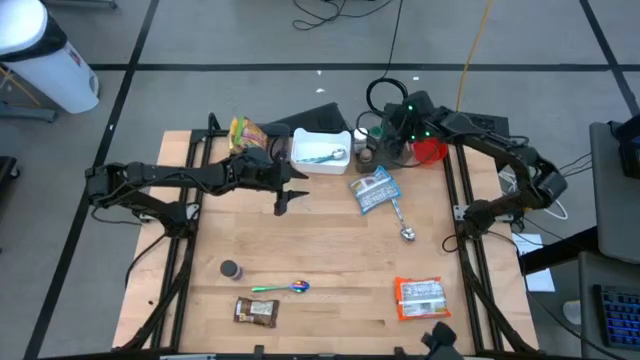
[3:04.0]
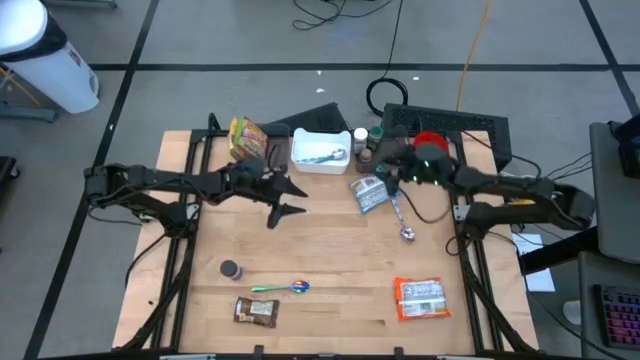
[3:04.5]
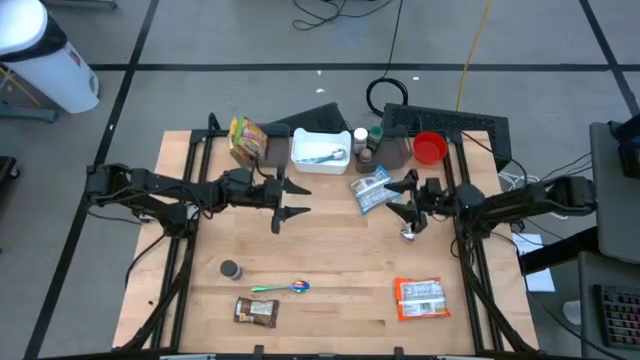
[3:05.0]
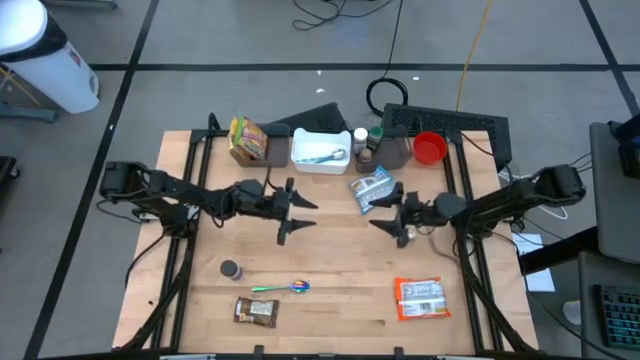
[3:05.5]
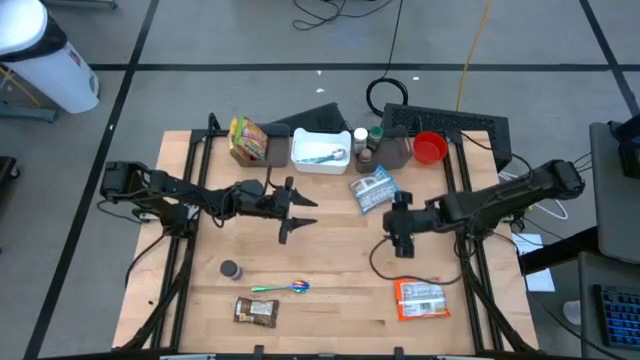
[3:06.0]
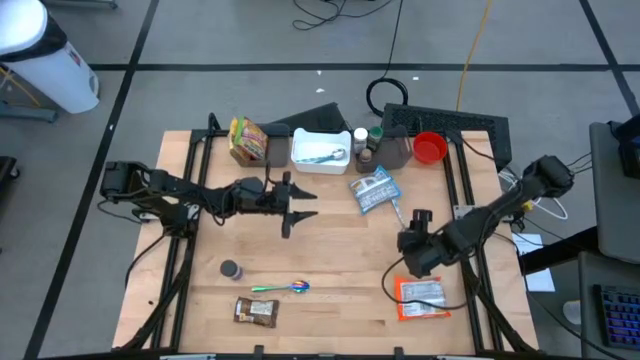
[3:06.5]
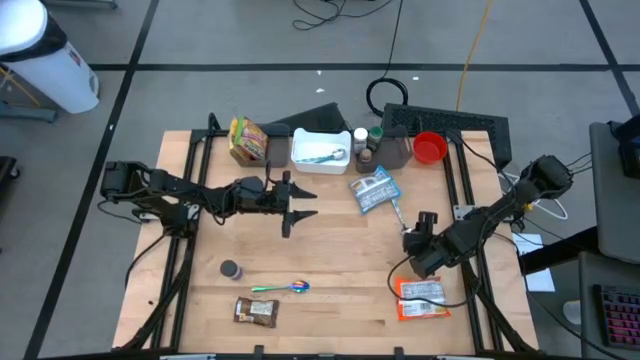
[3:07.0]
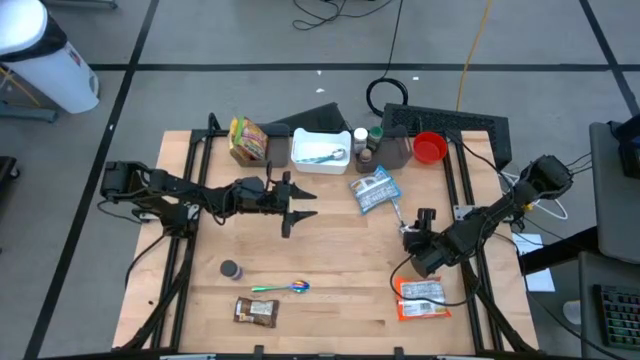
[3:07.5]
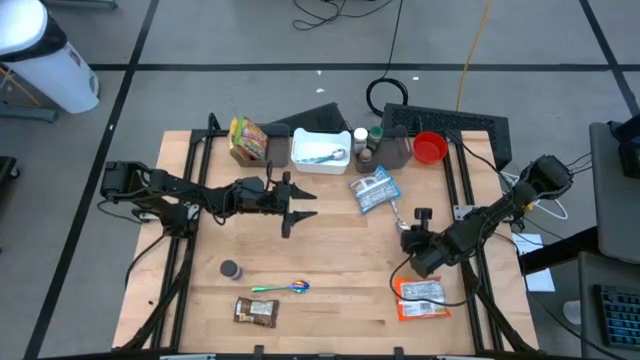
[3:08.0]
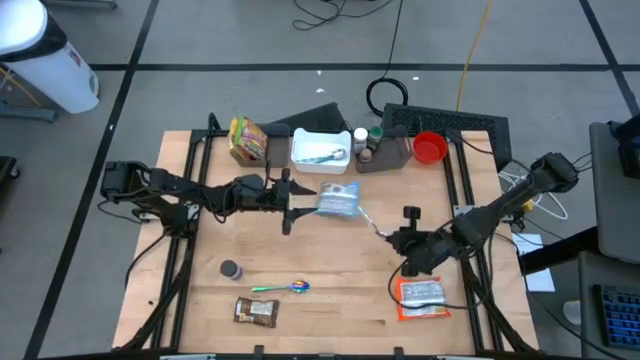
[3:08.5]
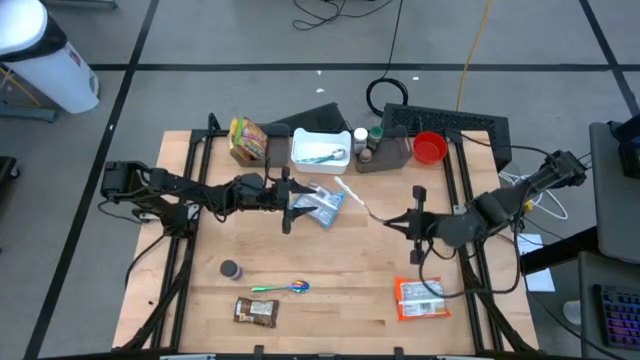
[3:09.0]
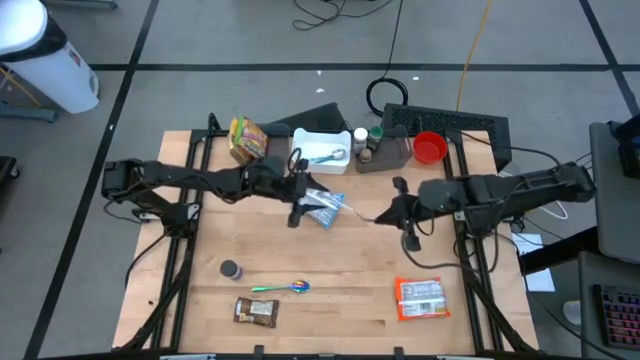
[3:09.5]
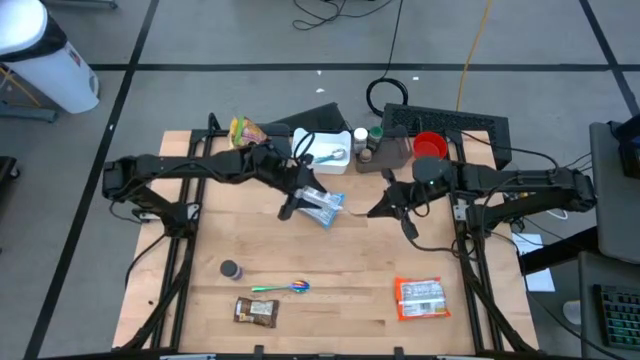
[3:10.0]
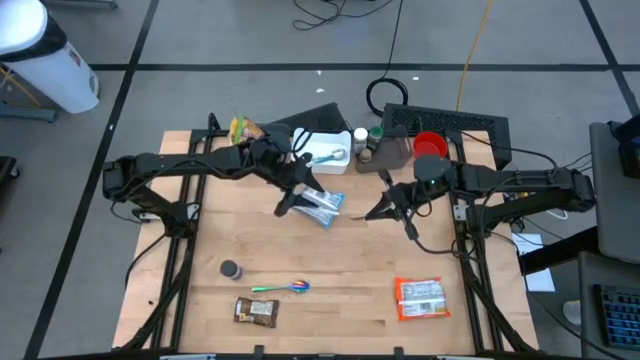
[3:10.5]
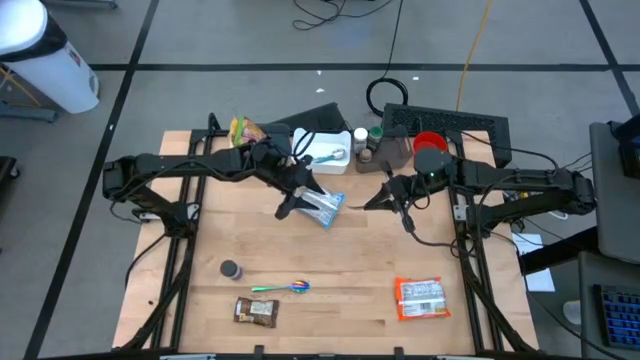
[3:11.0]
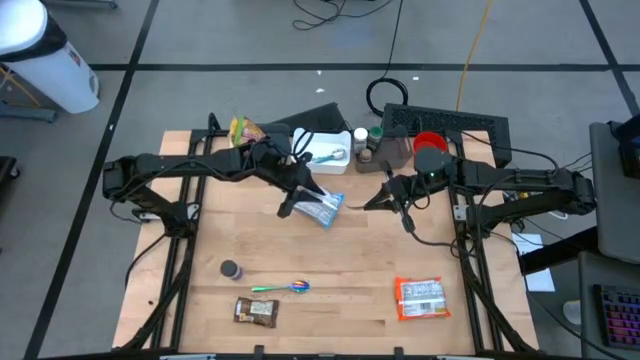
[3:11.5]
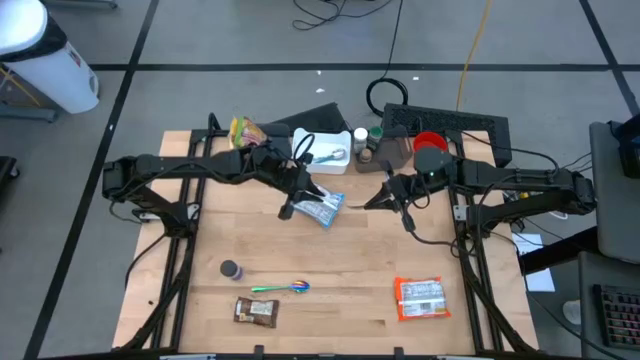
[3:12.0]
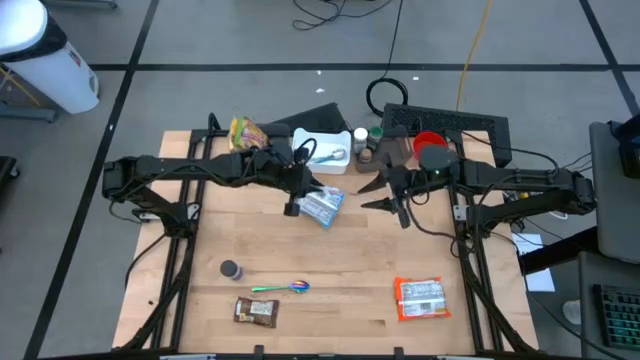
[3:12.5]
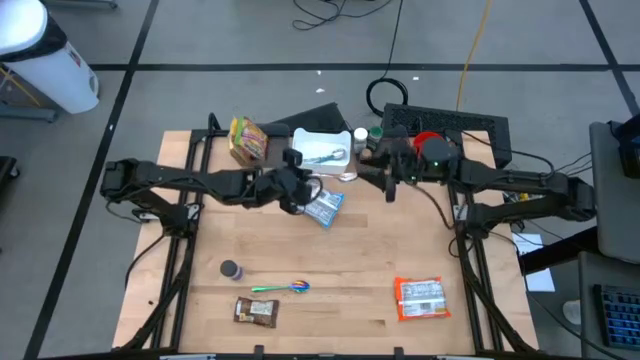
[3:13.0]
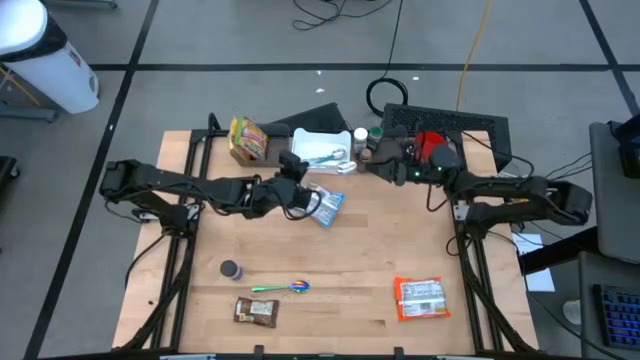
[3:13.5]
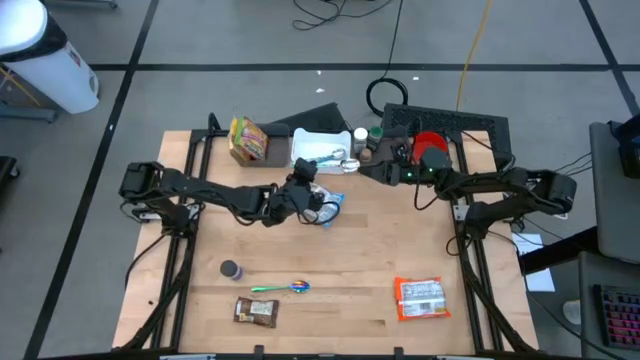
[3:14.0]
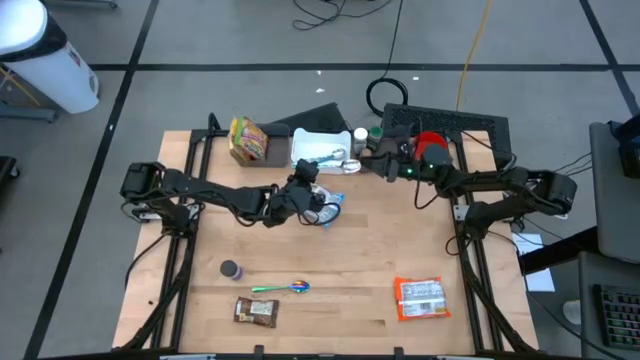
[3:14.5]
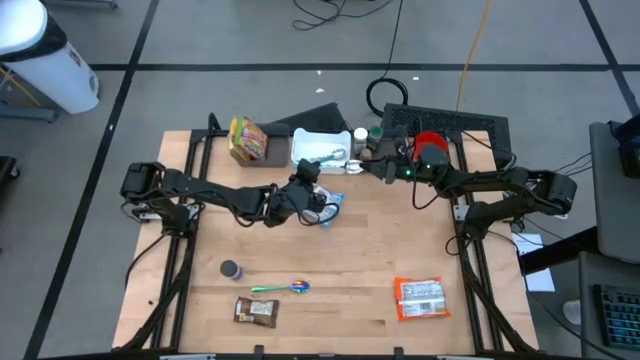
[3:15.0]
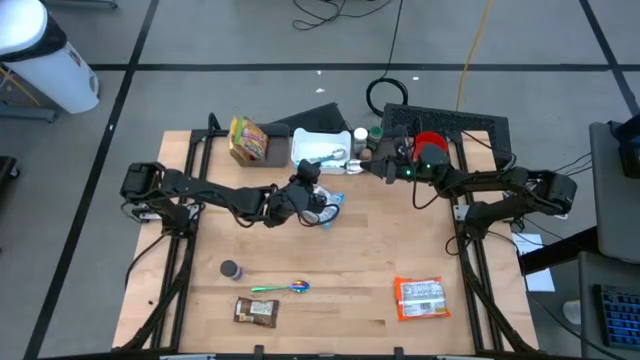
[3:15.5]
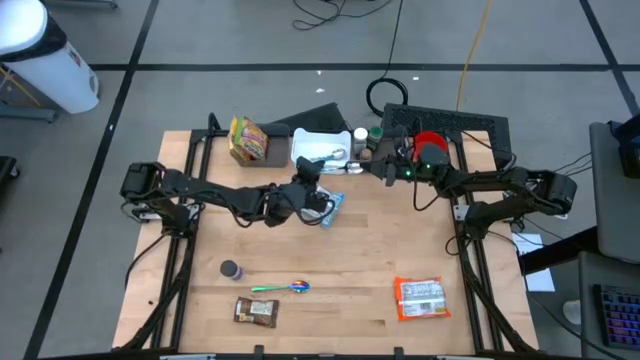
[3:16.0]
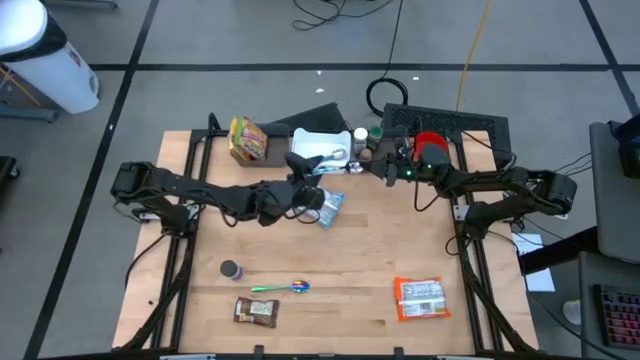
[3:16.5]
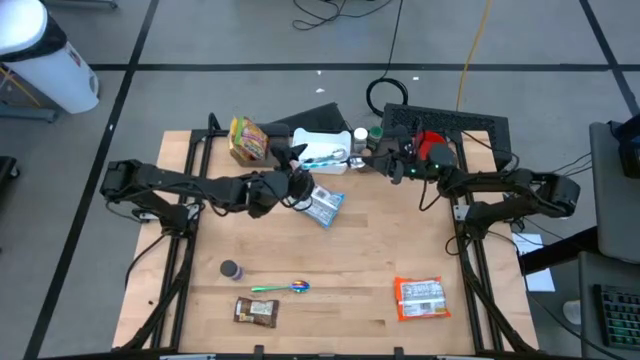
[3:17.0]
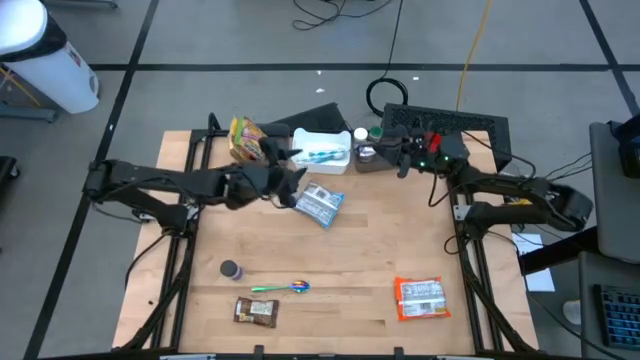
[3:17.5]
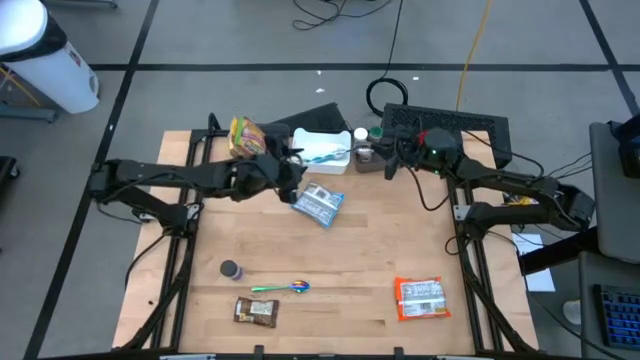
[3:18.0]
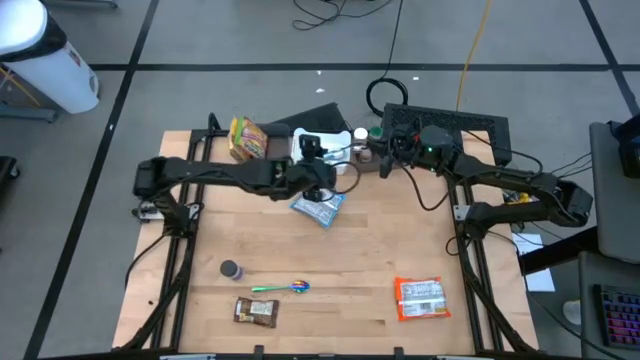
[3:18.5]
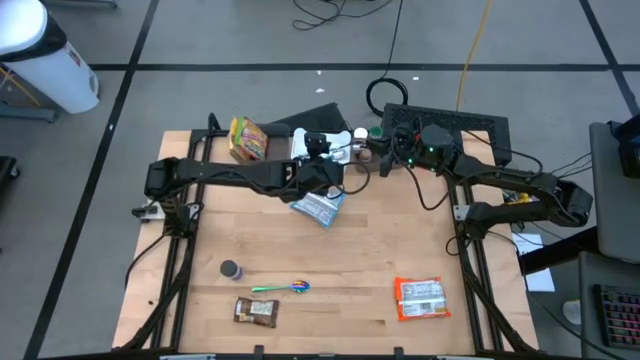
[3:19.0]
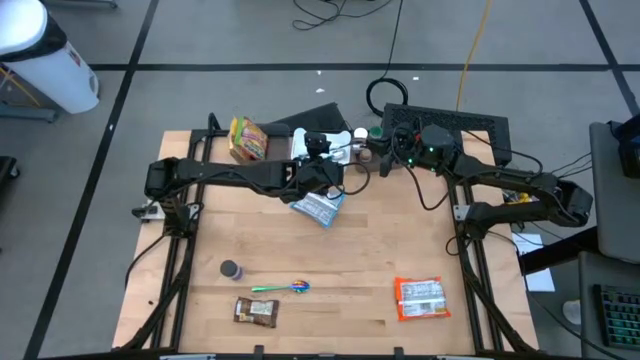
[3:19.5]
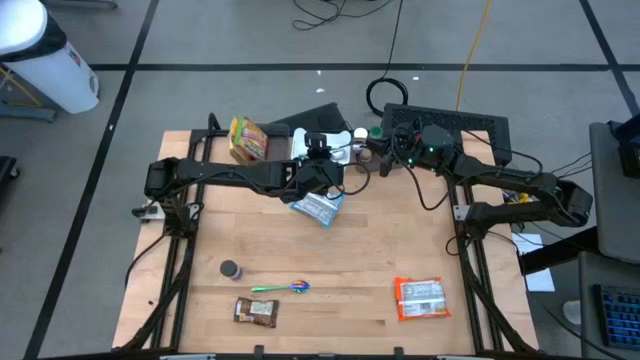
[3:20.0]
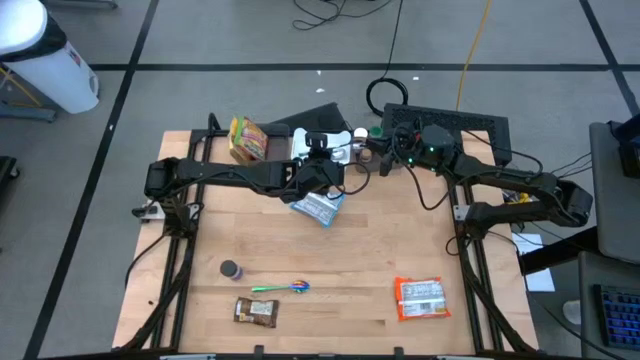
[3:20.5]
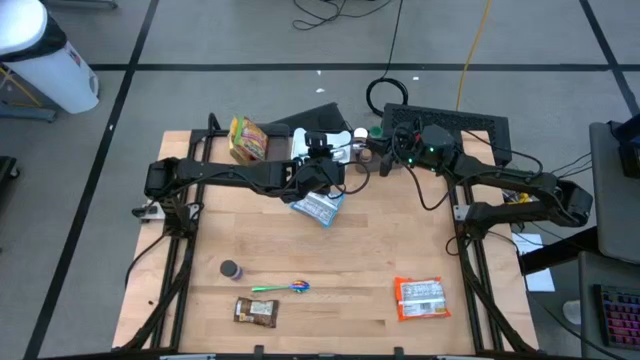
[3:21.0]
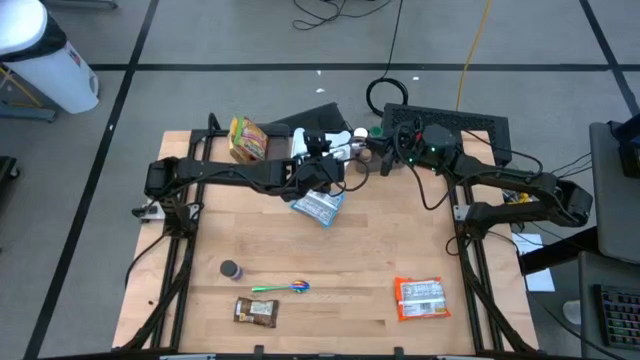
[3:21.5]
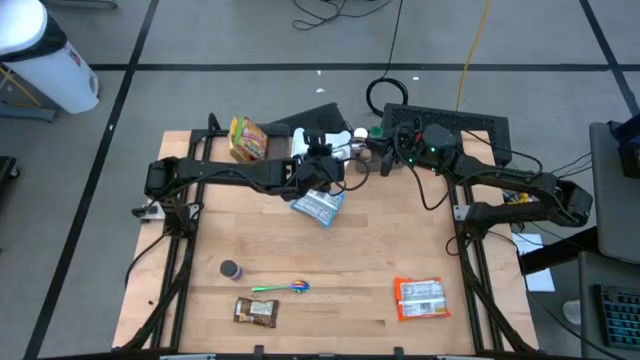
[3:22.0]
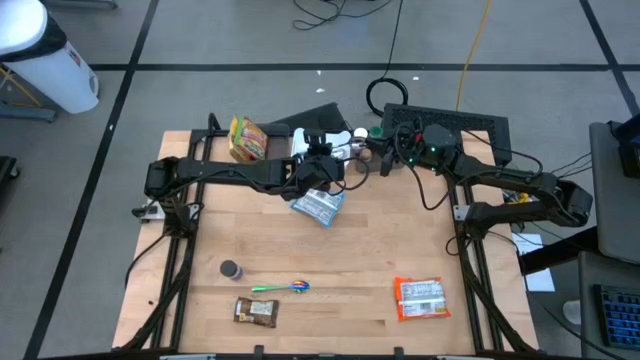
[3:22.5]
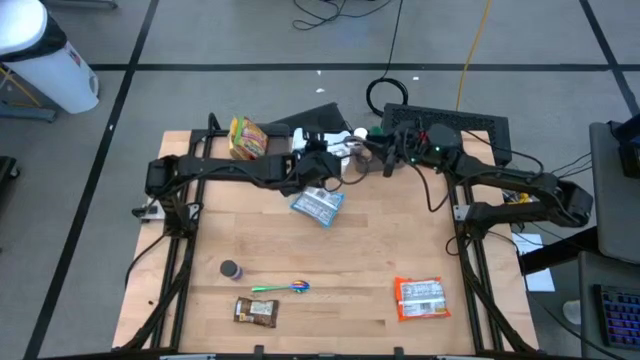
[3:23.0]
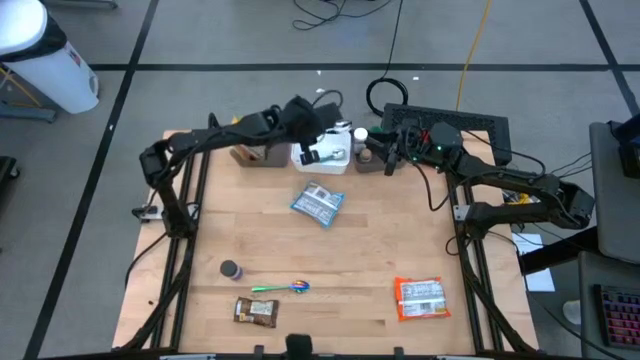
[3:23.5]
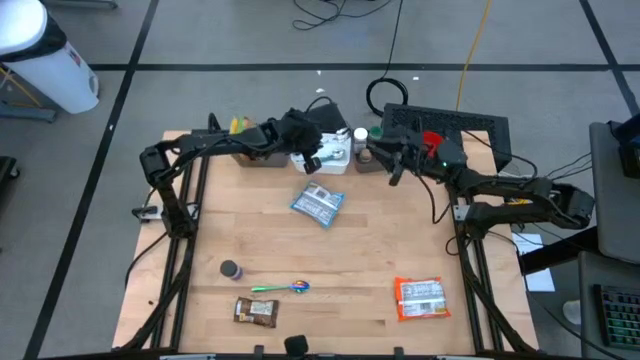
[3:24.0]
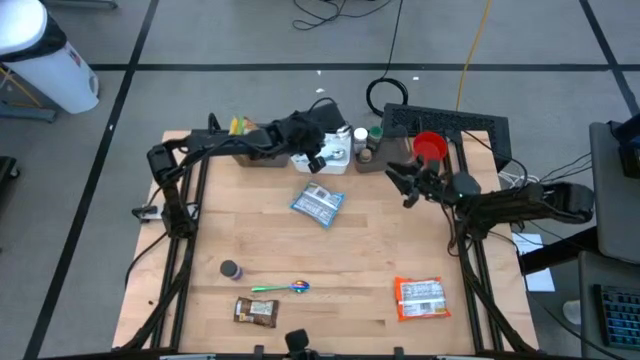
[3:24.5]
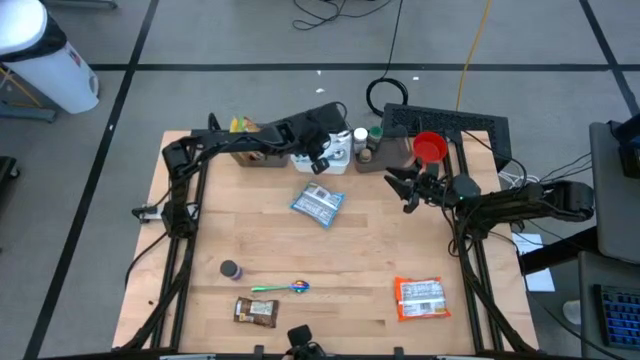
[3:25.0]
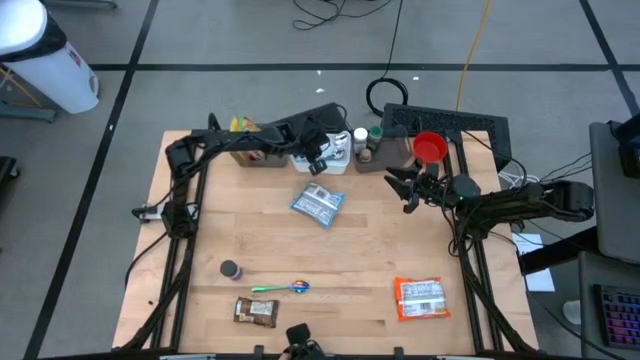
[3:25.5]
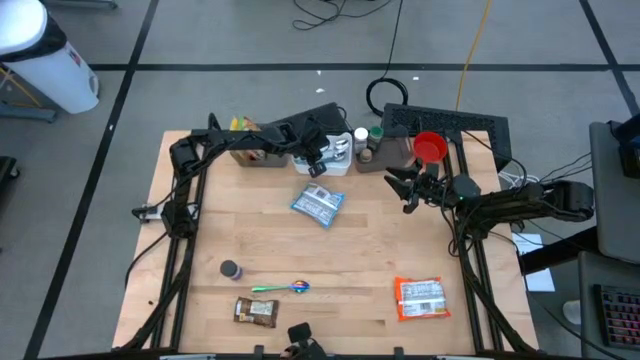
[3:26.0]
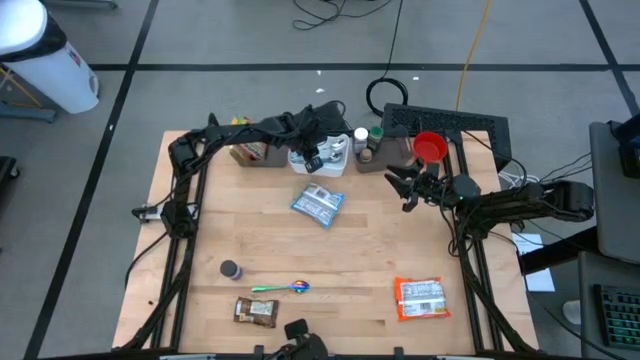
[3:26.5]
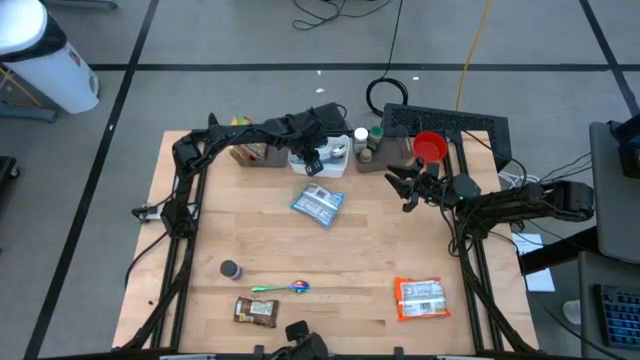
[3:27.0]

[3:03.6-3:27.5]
Task: Pick & Place Food Item
Put the white and blue spoon into the white bin
